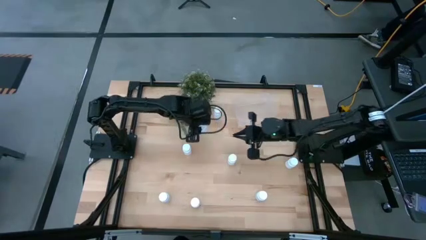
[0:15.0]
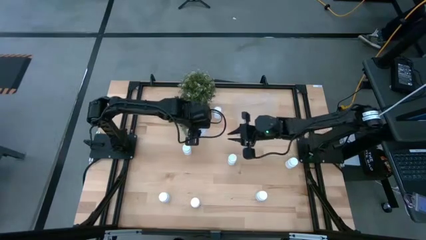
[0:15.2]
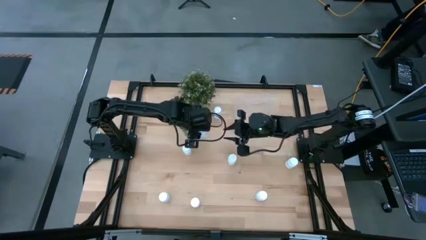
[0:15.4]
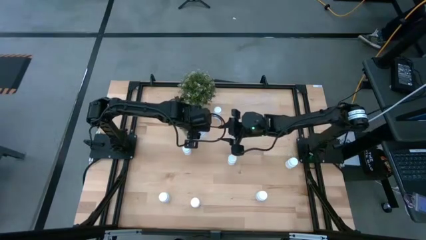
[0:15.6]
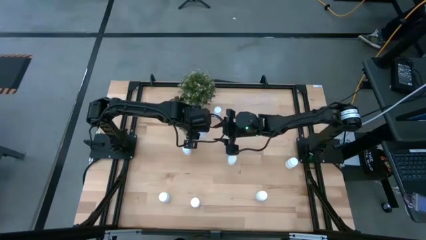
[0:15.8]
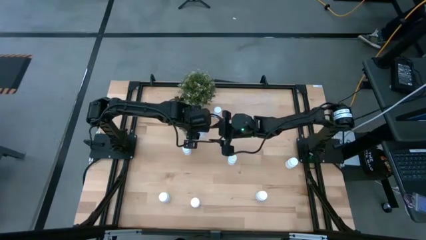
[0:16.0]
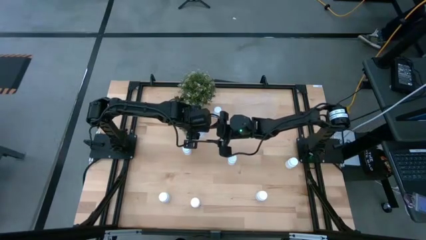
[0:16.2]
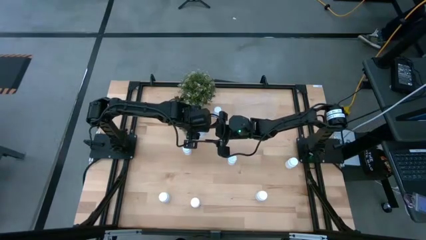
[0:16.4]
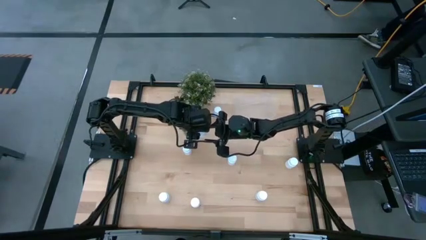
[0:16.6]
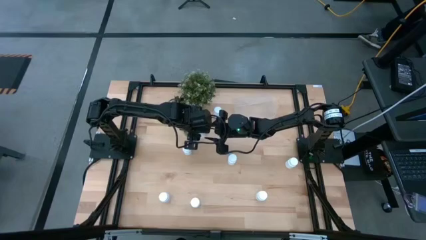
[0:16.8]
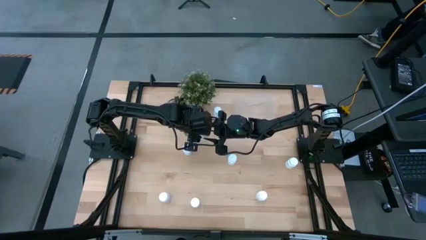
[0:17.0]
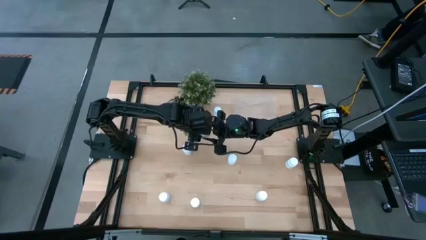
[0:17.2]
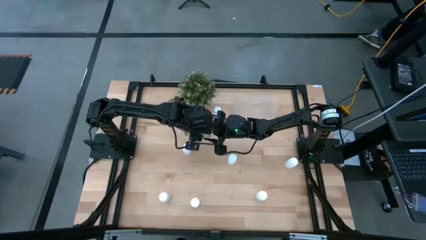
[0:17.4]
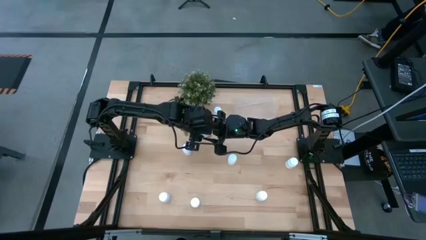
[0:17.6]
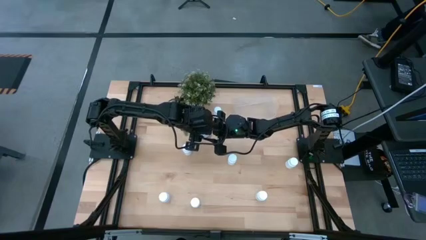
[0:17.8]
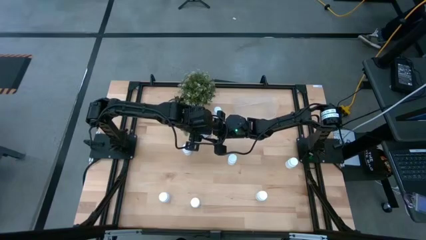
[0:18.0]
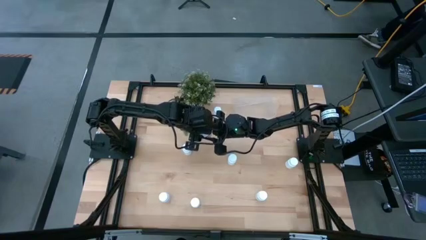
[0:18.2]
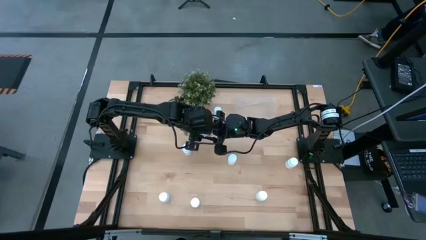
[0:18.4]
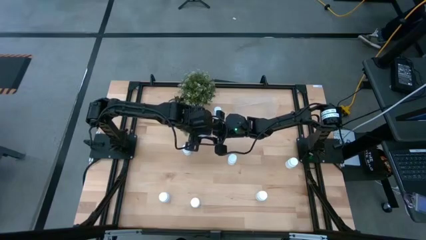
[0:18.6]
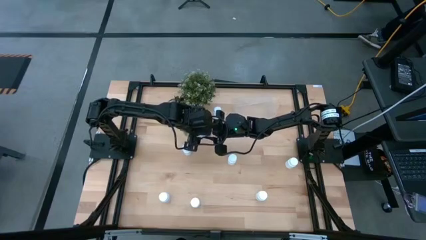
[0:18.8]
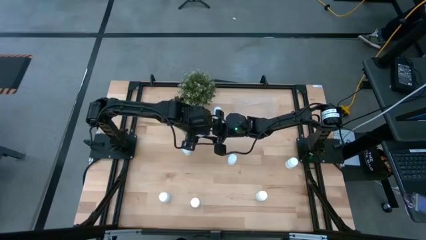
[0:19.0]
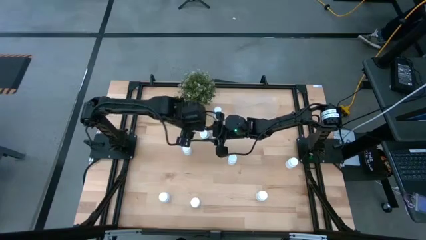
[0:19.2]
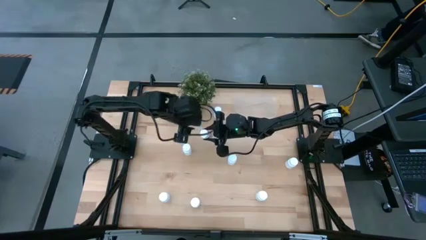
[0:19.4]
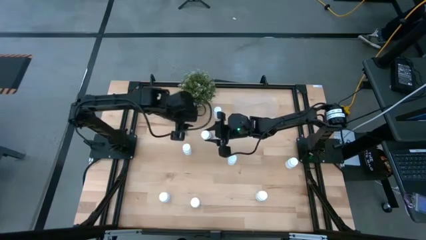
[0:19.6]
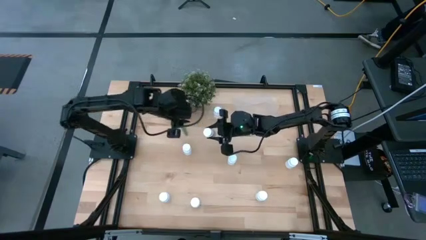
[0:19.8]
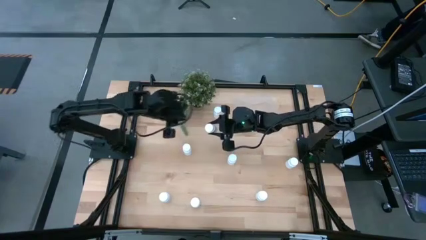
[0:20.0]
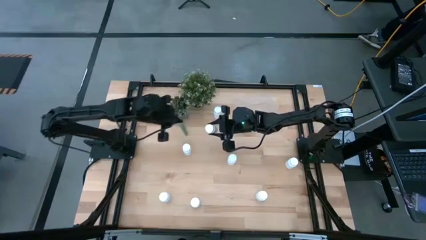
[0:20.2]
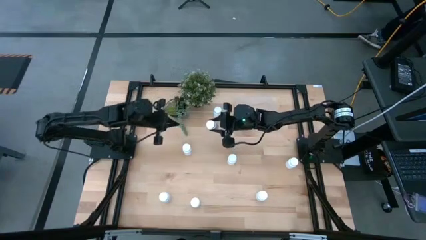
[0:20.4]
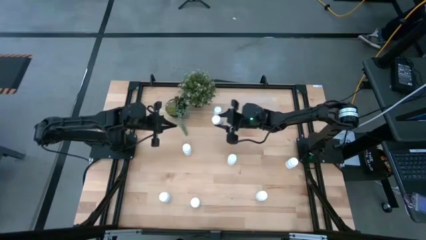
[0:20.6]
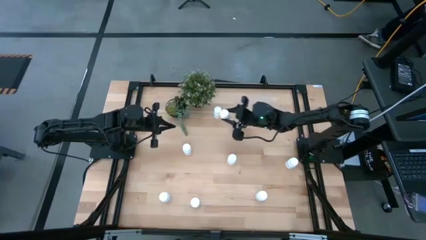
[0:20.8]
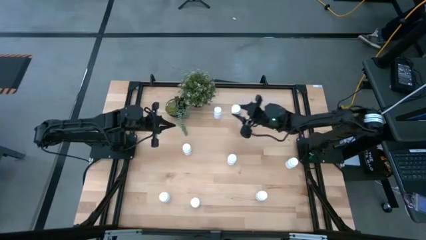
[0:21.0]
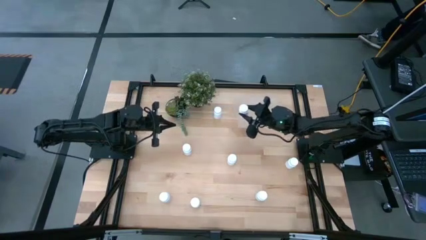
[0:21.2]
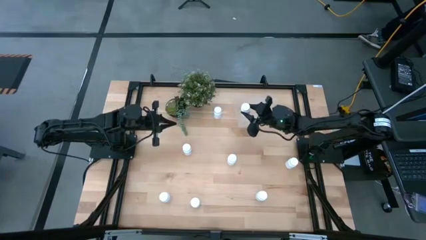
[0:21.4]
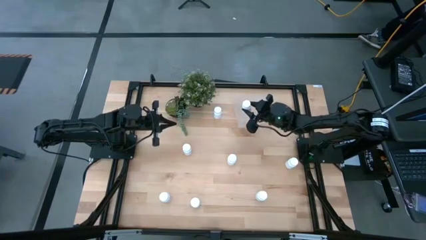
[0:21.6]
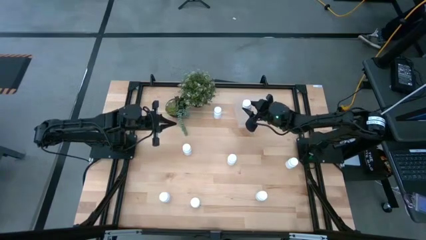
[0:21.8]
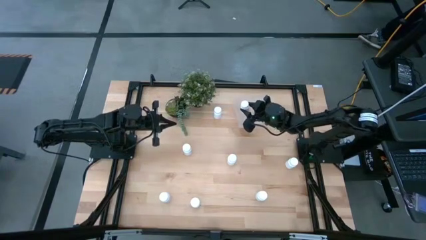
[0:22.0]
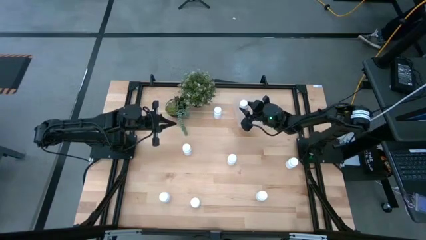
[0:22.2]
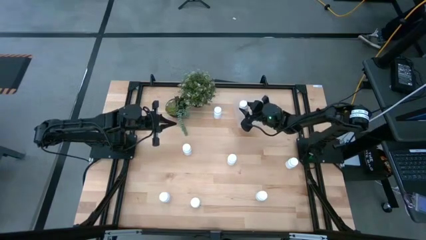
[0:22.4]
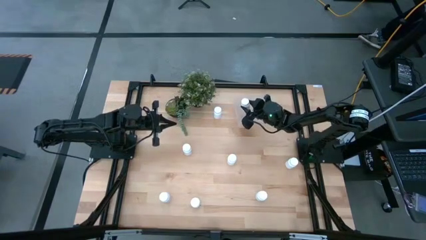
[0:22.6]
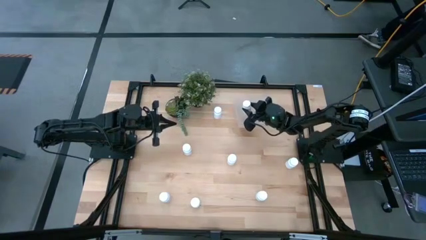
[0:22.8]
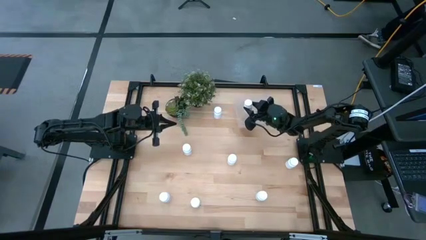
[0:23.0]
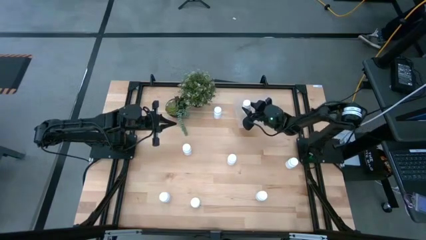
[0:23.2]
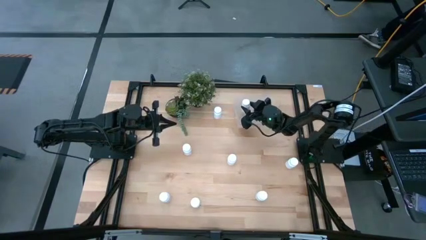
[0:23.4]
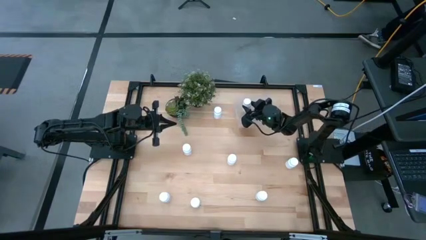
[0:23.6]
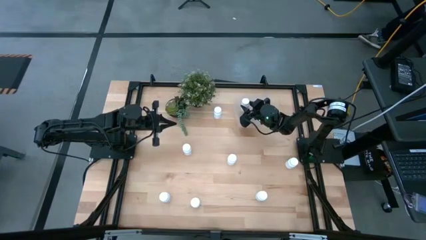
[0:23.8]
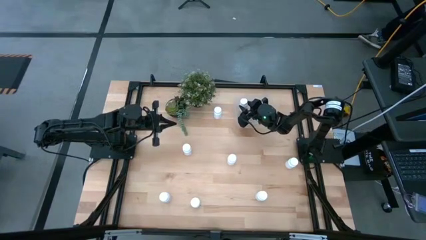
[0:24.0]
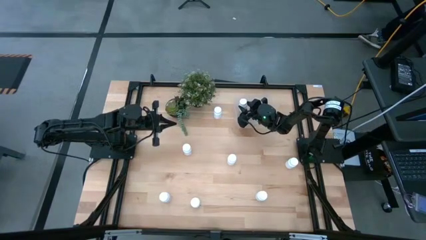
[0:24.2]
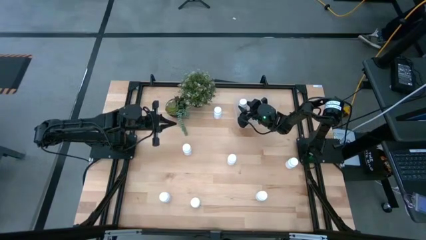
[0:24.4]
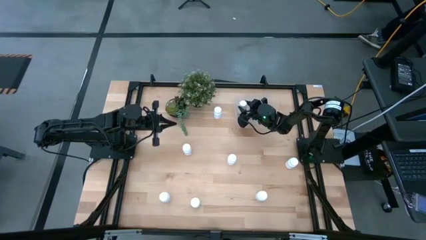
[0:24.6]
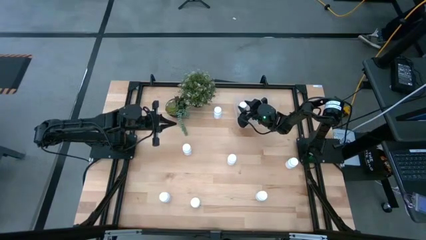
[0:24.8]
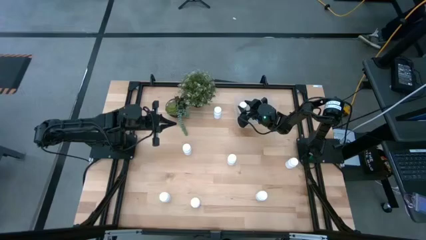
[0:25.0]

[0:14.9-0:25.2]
Task: Pick and place pill bottles into a basket
Put the white pill bottle into the transparent bin

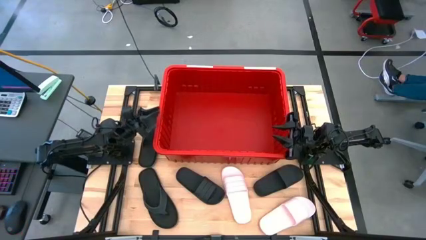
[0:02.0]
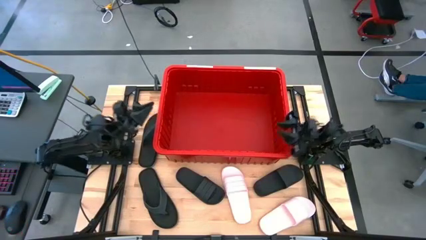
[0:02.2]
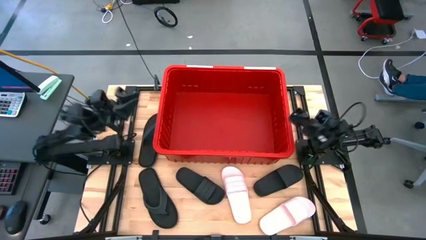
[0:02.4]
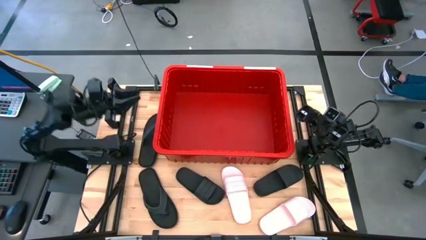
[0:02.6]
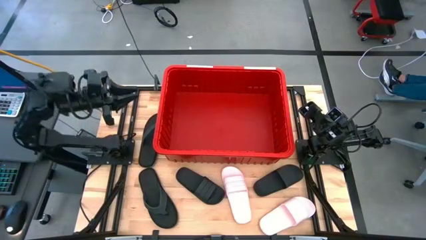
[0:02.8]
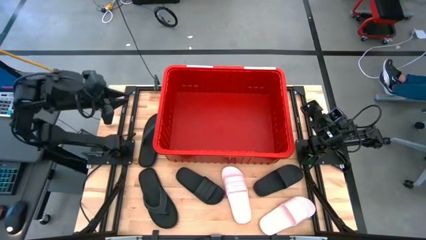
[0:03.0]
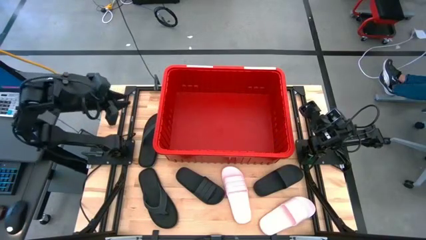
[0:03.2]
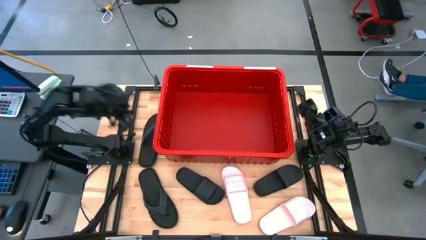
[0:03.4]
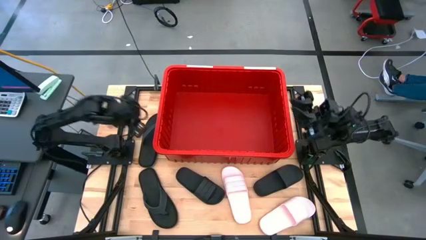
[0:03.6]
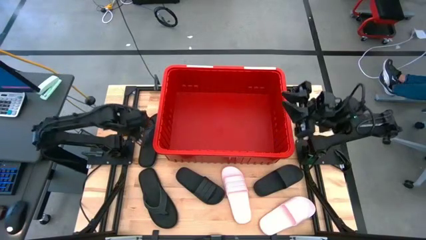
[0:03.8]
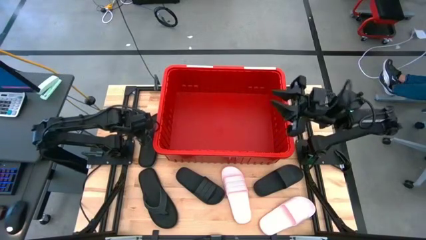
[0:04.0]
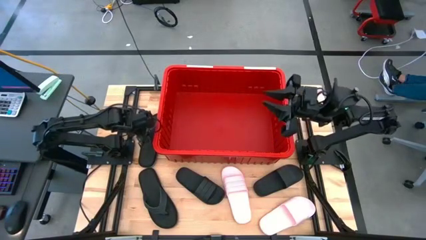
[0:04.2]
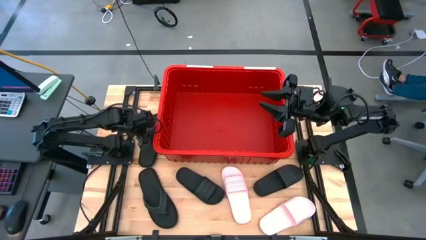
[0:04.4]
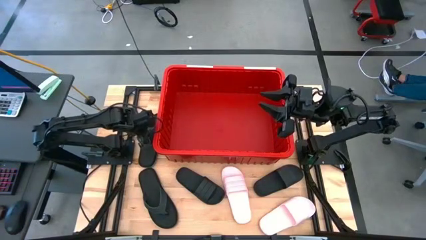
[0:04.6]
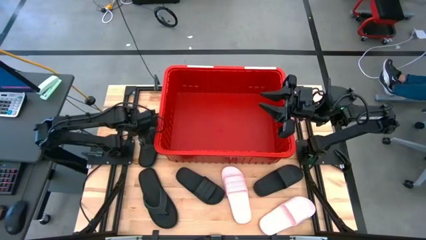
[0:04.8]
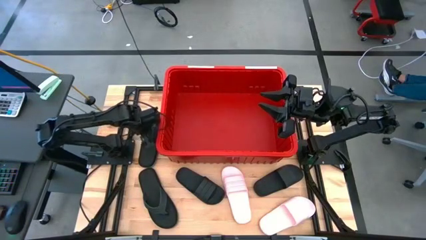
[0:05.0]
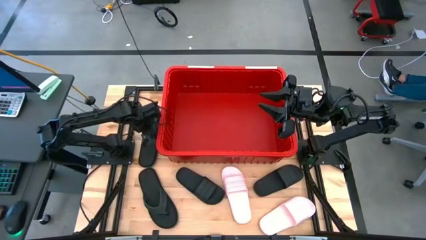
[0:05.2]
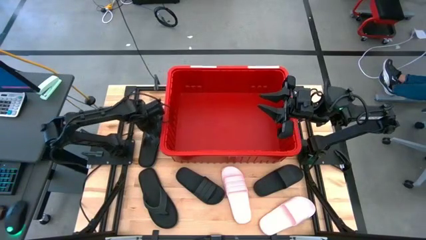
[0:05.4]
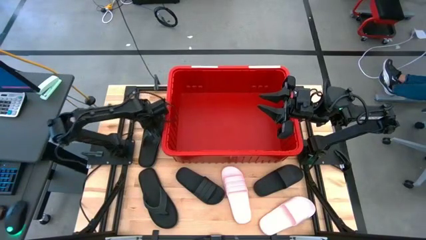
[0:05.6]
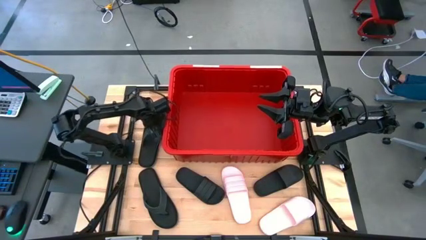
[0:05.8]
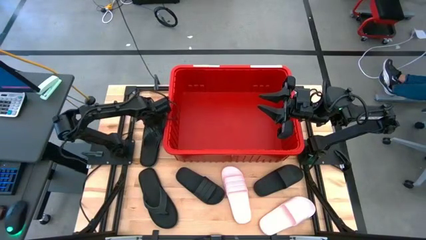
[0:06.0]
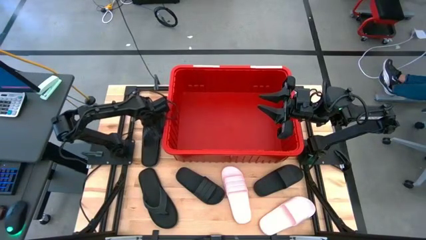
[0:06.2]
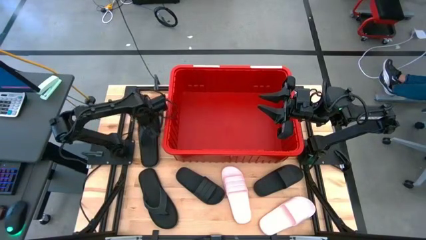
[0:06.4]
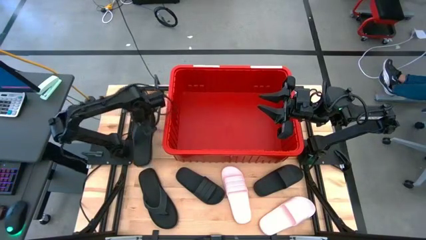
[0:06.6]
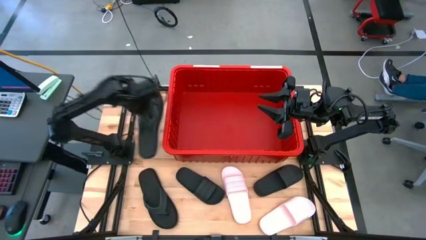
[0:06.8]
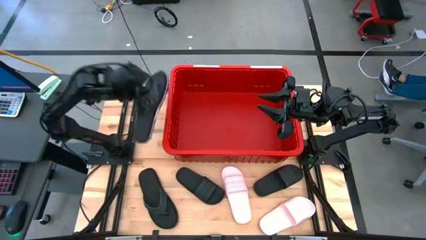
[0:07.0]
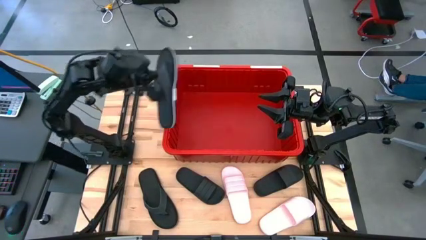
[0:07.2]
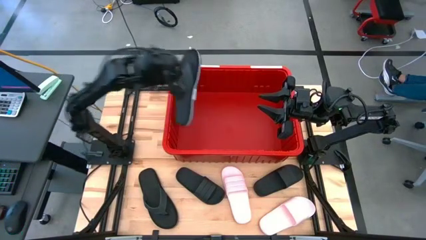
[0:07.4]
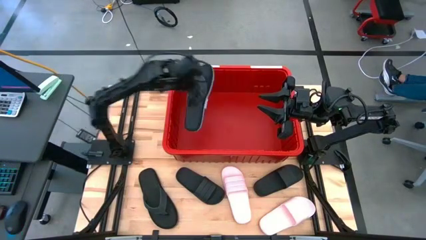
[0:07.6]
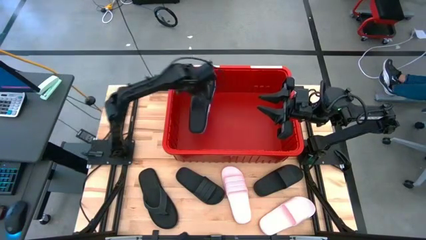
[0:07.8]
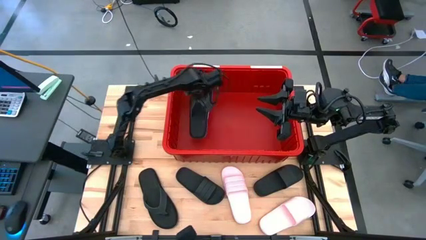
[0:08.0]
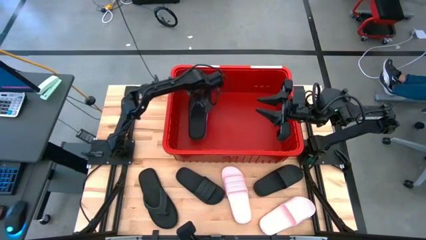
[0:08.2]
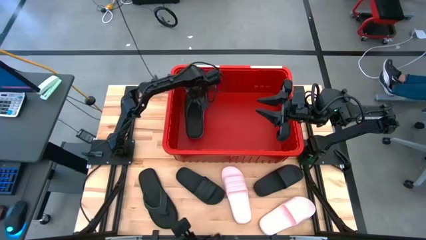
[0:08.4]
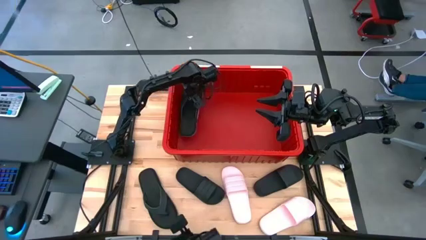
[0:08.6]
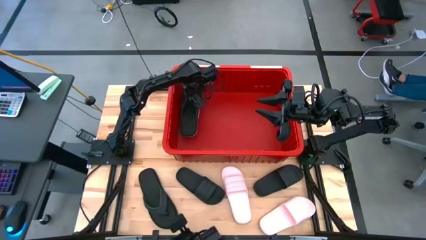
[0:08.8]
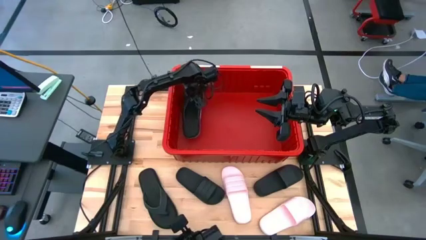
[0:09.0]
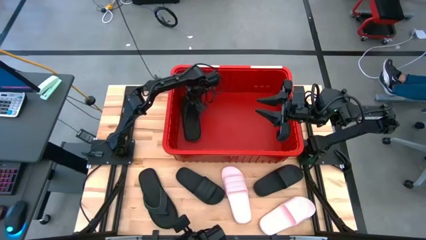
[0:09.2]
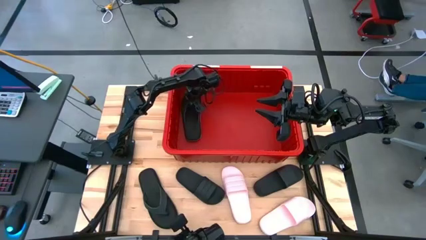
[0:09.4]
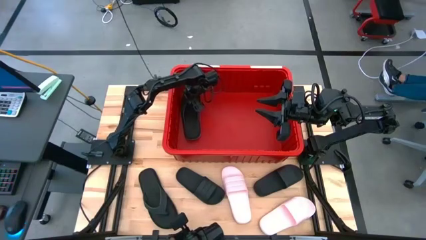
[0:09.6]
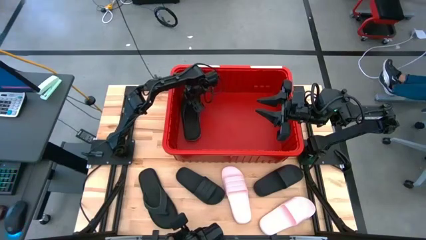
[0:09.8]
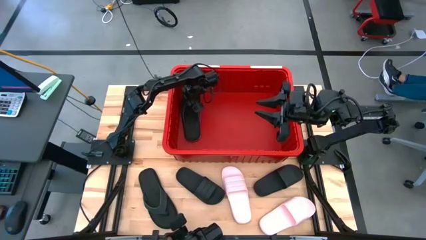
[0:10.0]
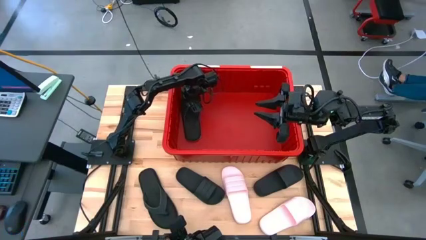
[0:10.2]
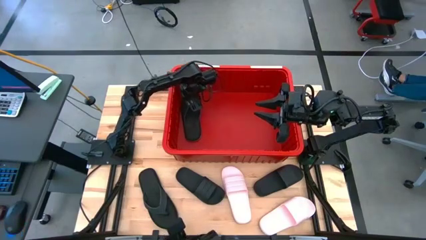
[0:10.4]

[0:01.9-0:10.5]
Task: Pick and place slides into bin
Put the top black flip flop into the red bin
